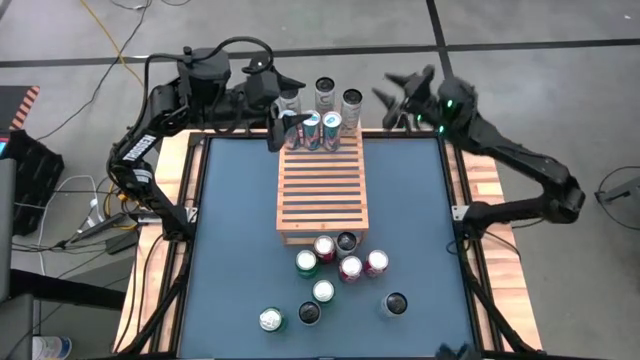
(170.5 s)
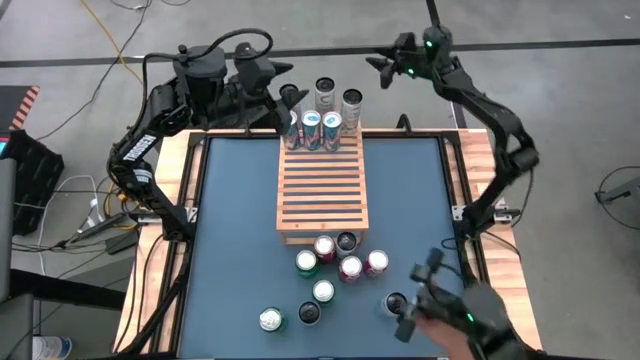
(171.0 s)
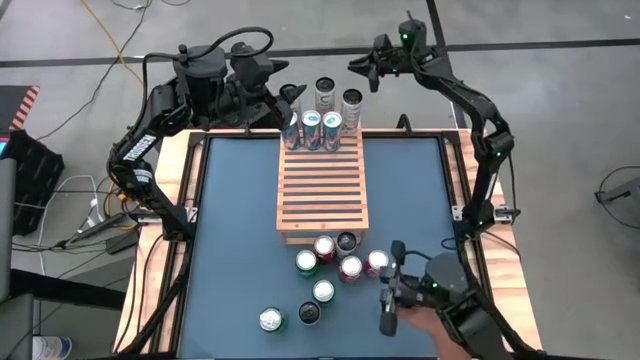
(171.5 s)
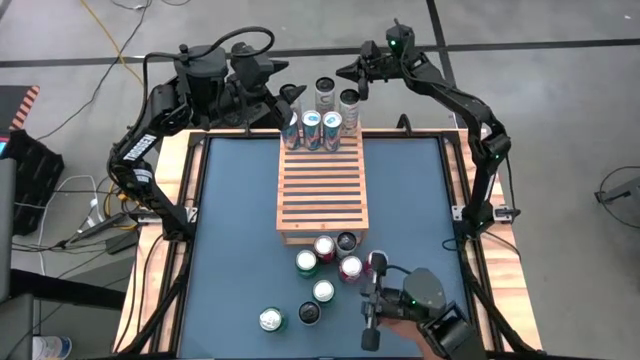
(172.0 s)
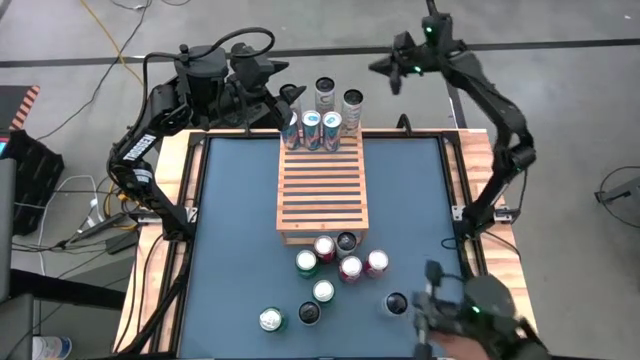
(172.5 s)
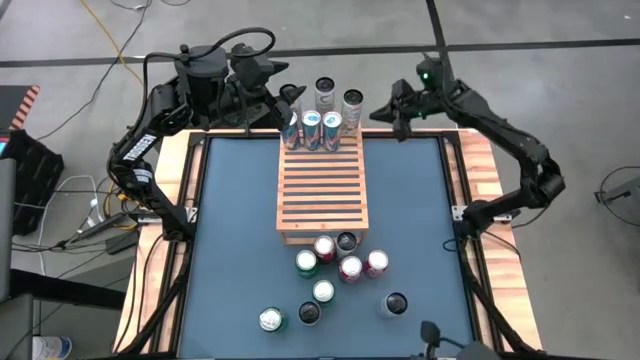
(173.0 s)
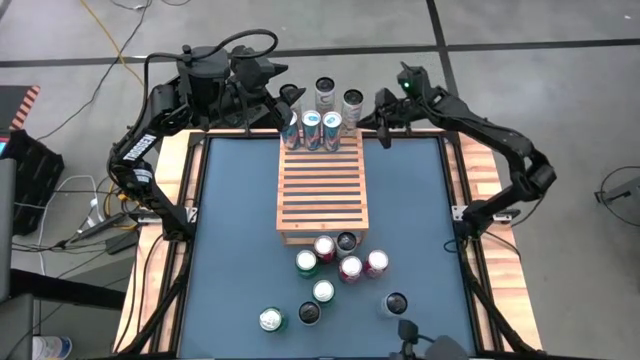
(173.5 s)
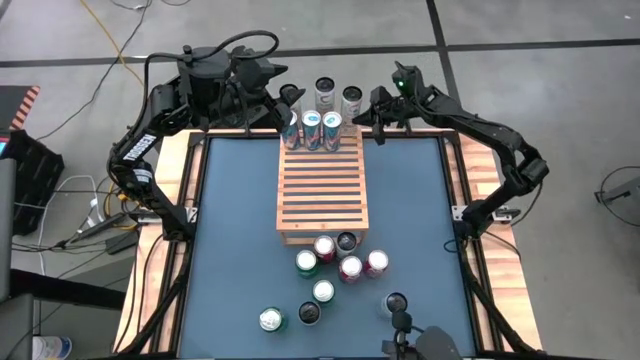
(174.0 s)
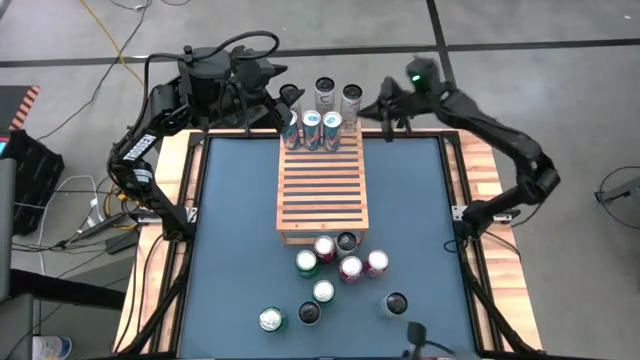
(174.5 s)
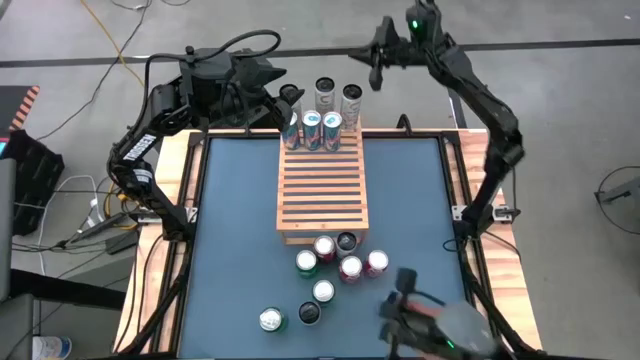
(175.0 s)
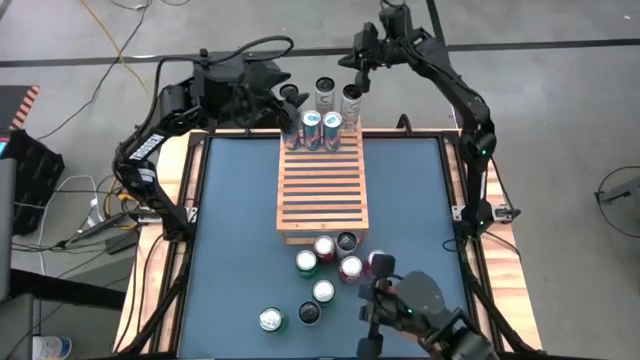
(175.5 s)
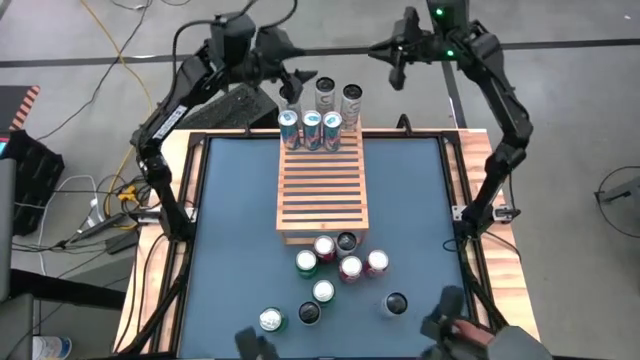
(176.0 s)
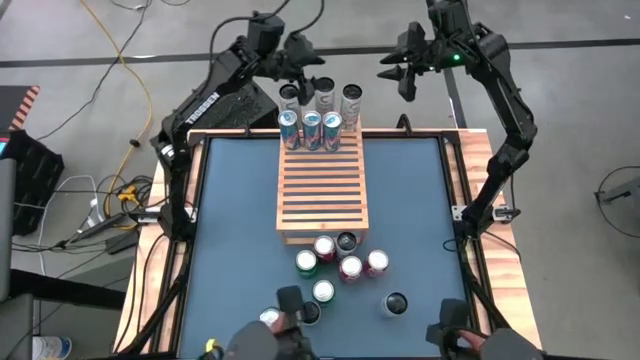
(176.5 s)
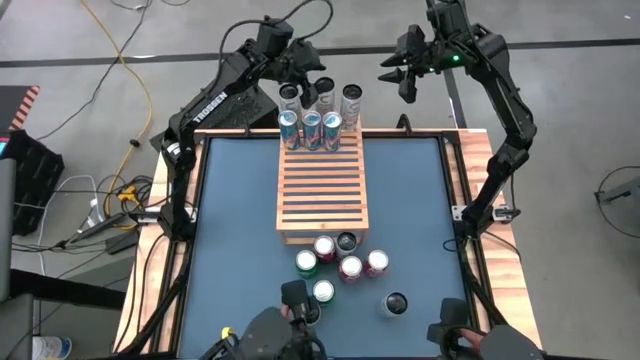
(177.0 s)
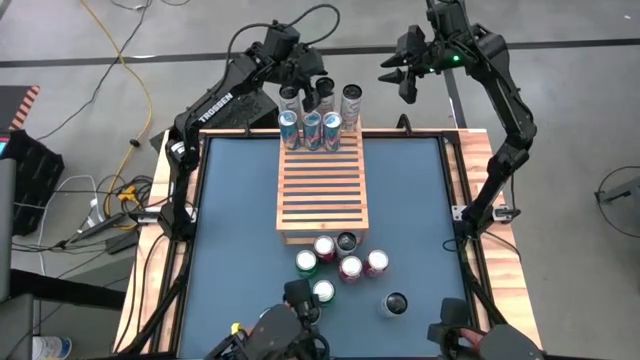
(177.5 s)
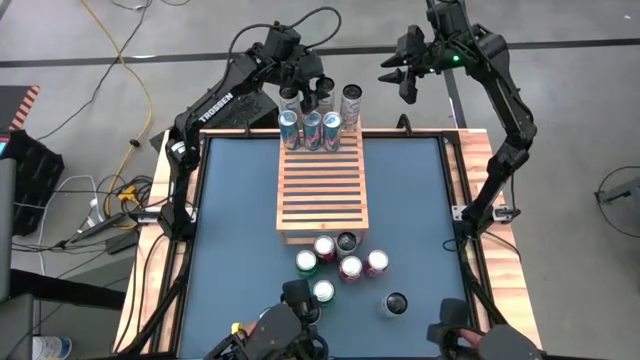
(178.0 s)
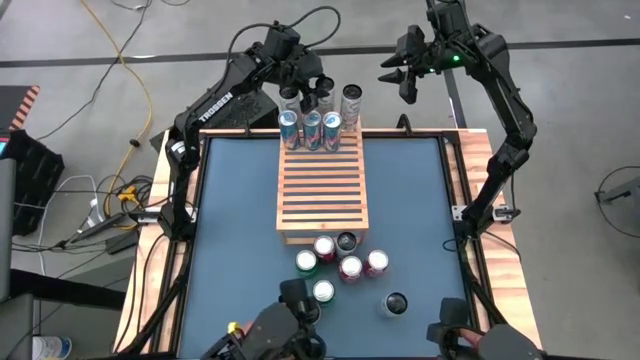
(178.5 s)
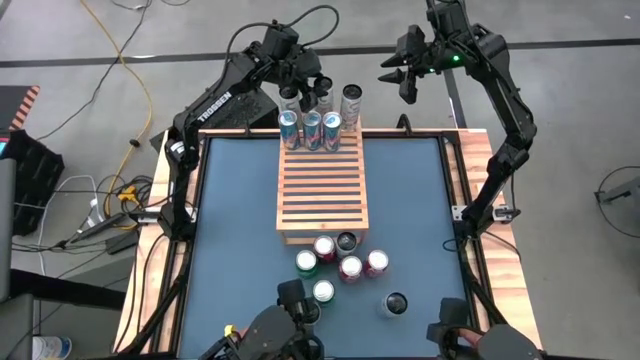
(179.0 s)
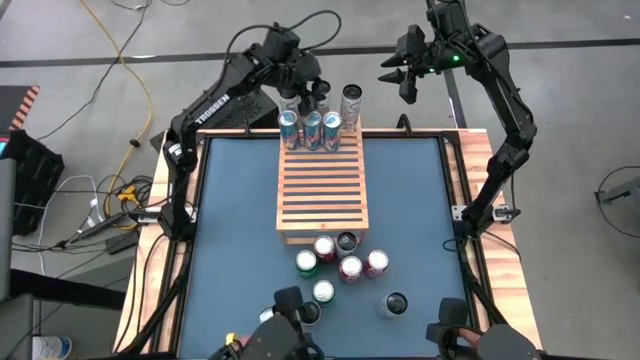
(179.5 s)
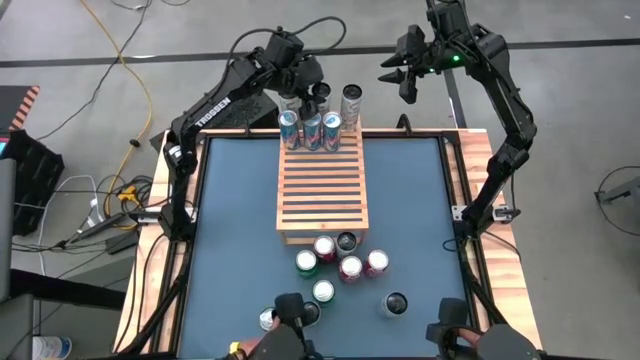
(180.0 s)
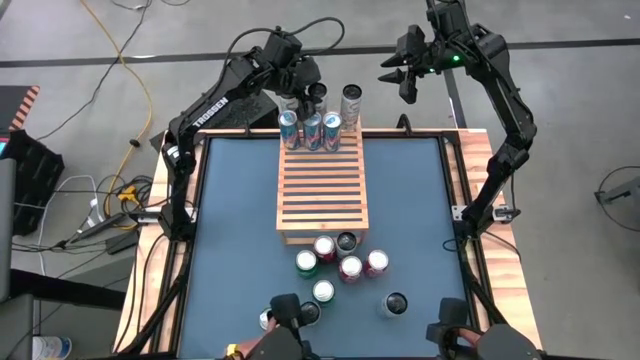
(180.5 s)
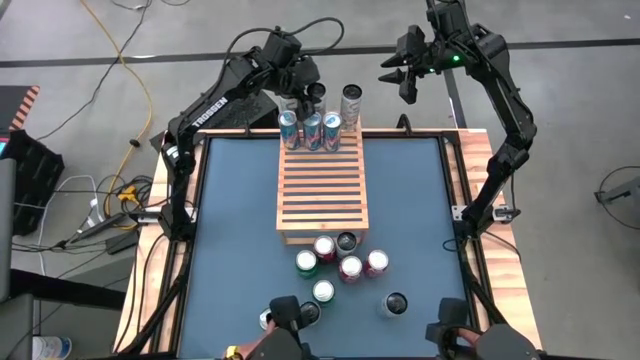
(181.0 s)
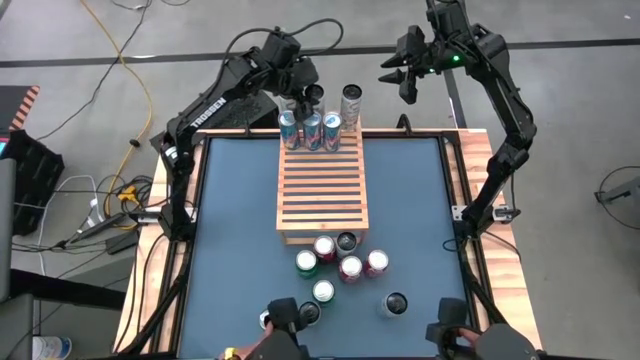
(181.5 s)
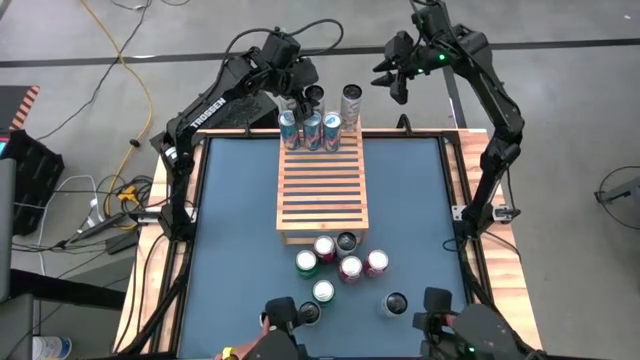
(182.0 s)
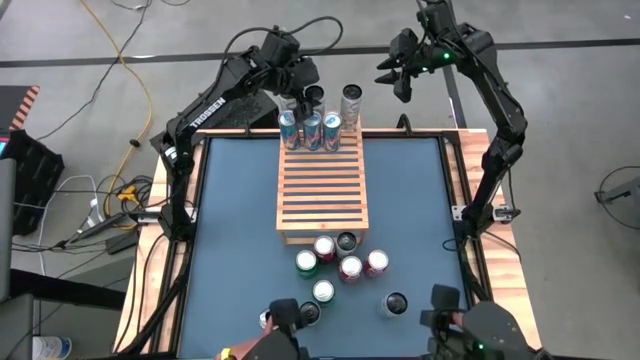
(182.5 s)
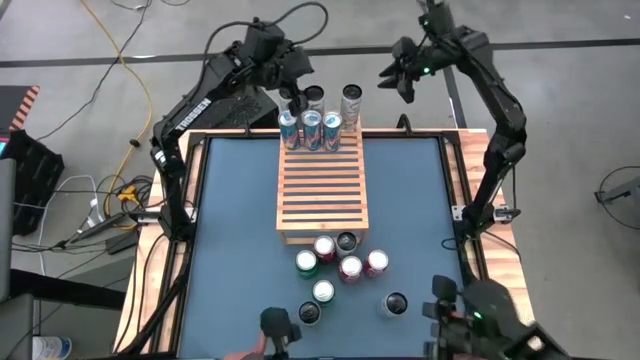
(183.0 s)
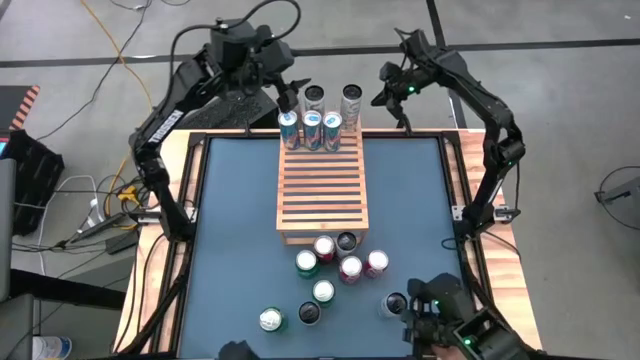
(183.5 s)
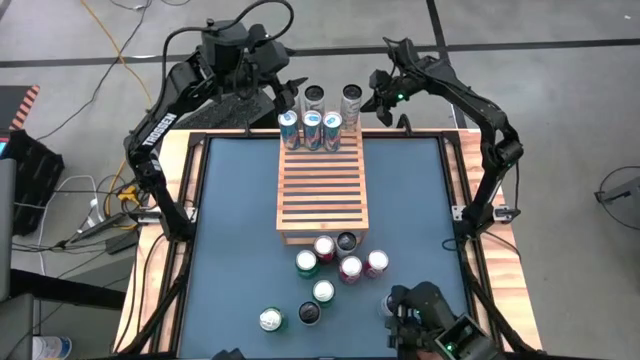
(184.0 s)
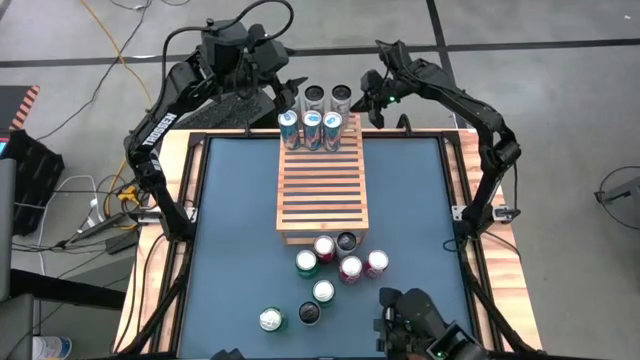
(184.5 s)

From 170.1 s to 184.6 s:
Task: Place canned beverage on shelf
Adjust the soda cans on the shelf

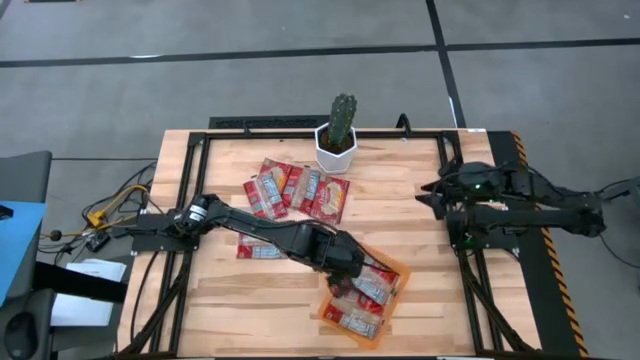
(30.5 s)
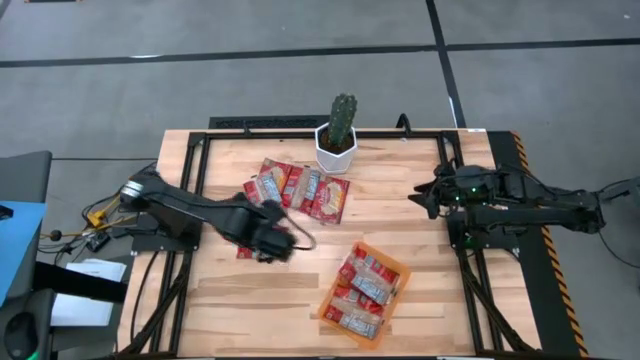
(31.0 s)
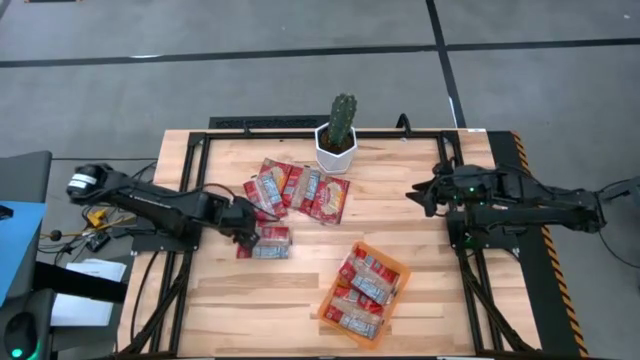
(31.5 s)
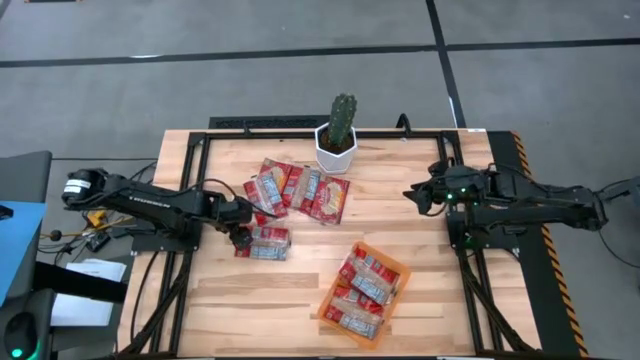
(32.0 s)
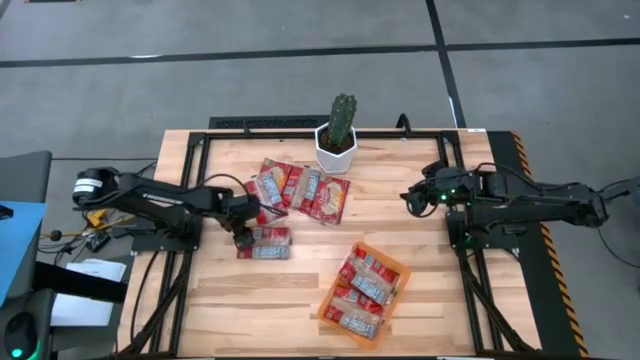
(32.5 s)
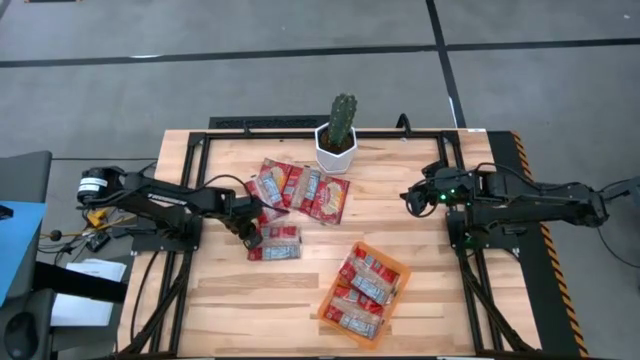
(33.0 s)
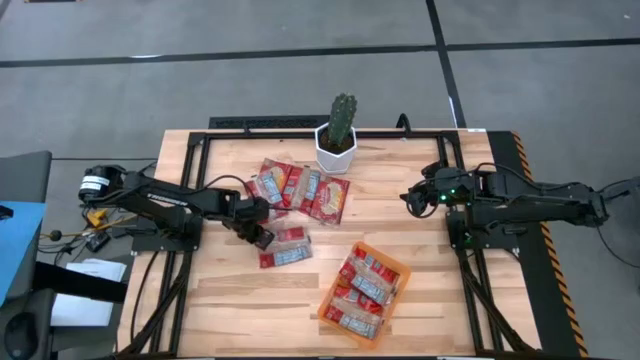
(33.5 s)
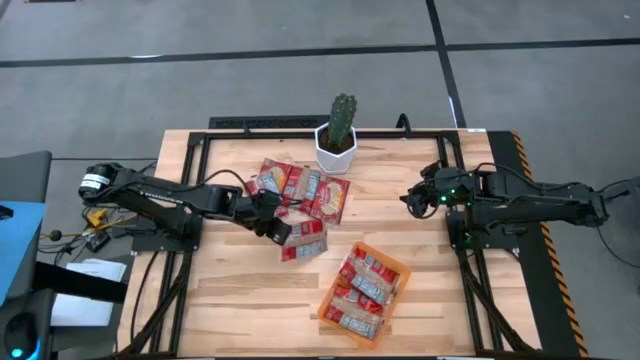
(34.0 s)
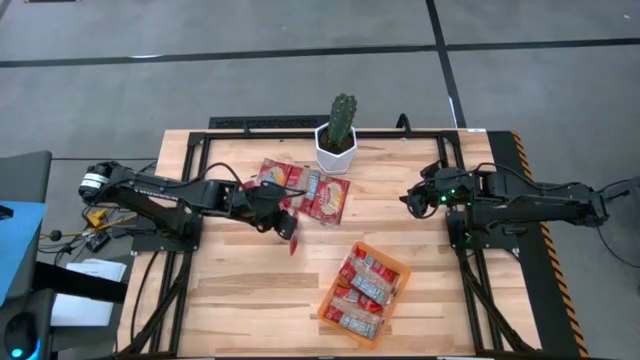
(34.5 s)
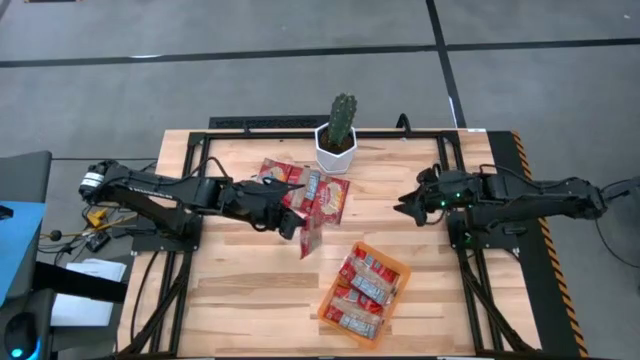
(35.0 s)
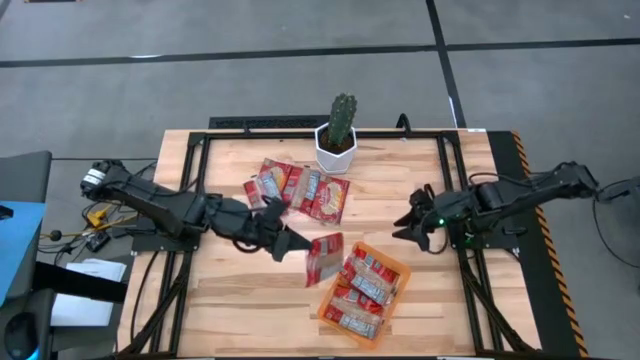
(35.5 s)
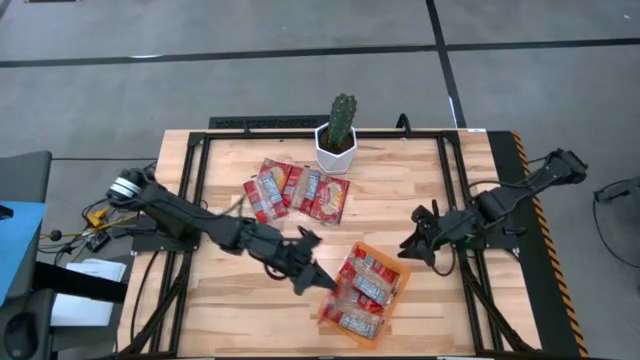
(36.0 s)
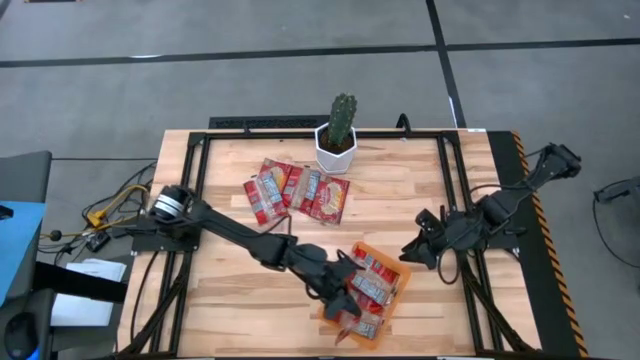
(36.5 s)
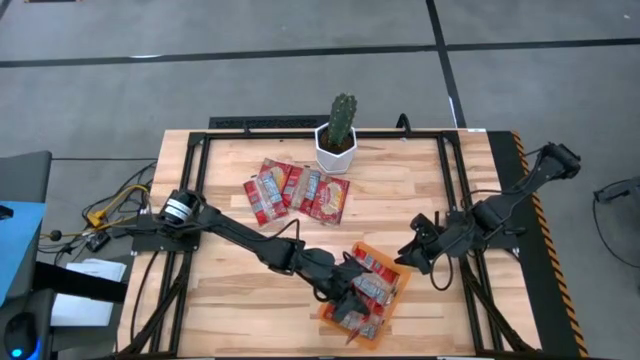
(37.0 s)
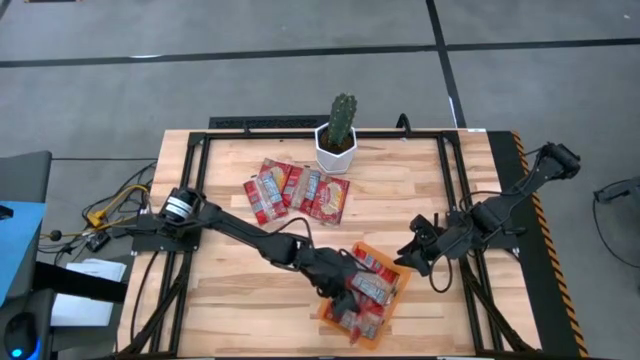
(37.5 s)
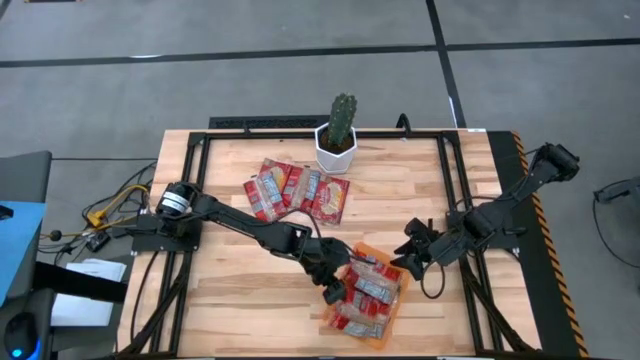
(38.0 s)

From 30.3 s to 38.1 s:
Task: Sort popcorn bags into baskets
Put the red popcorn bag into the orange container
